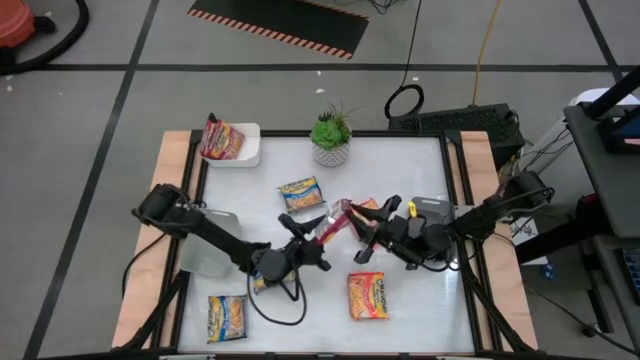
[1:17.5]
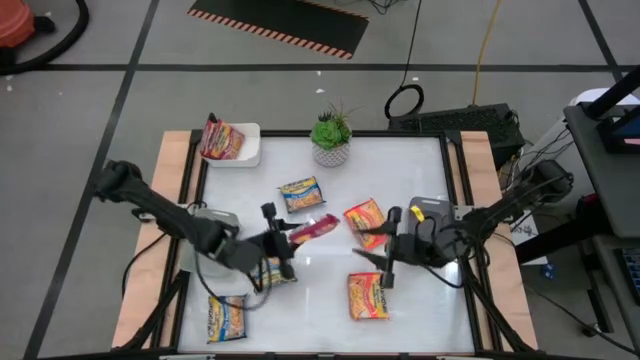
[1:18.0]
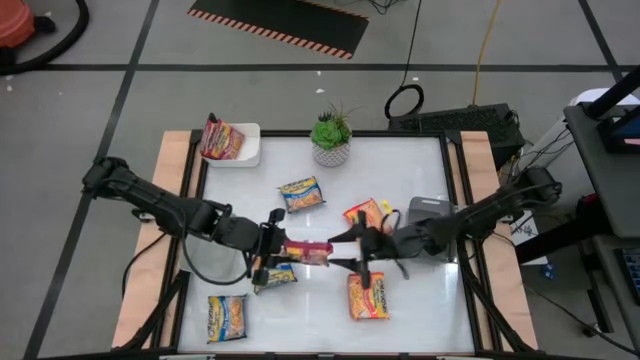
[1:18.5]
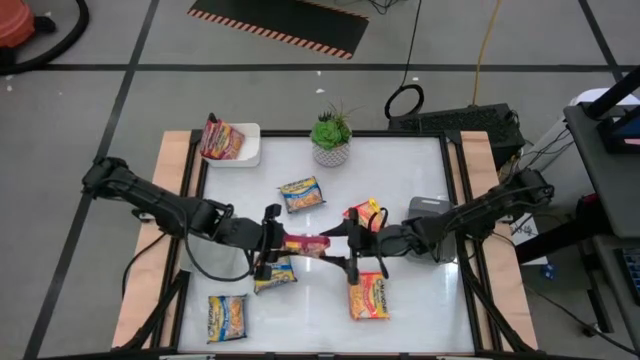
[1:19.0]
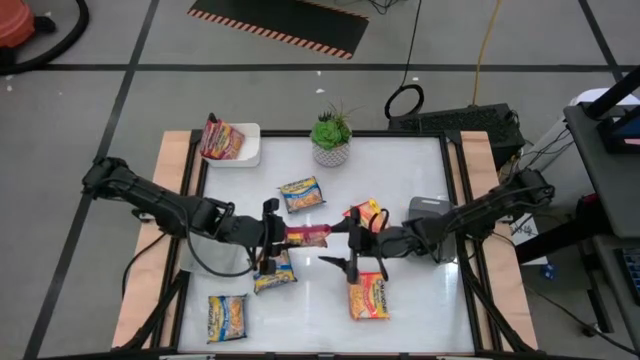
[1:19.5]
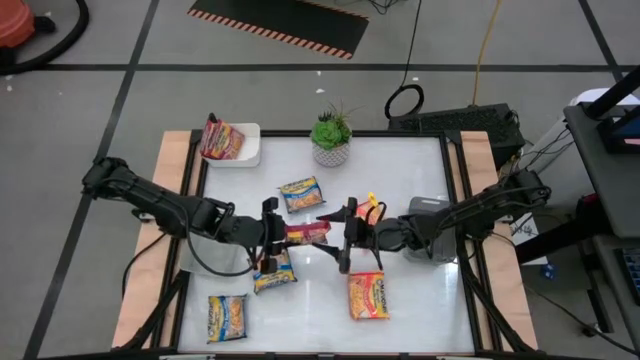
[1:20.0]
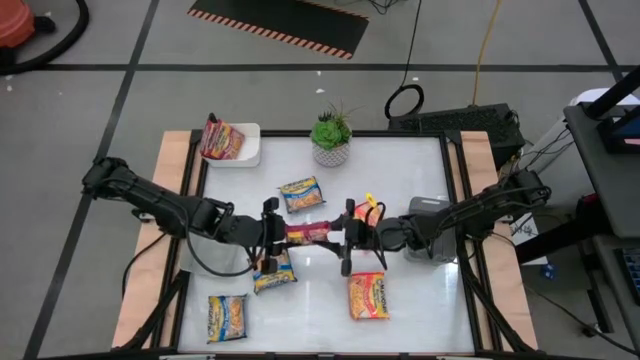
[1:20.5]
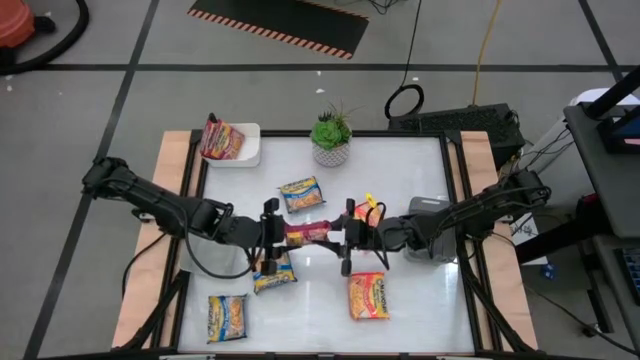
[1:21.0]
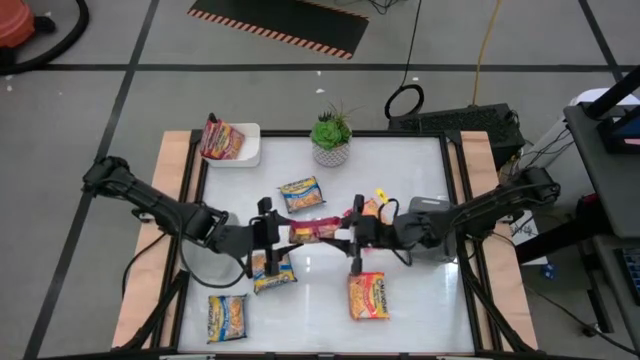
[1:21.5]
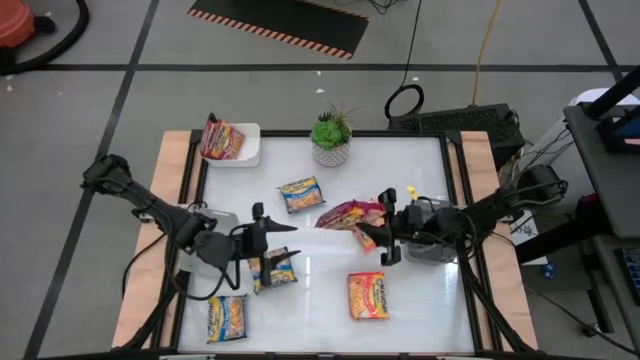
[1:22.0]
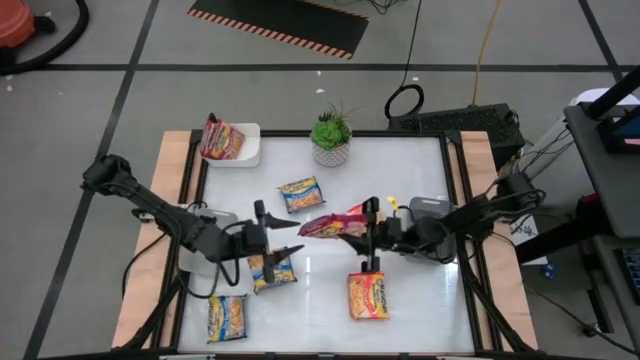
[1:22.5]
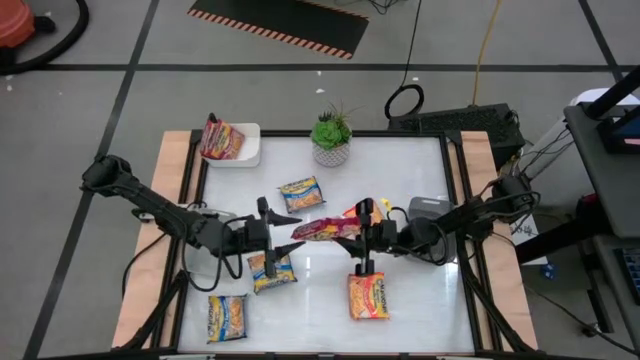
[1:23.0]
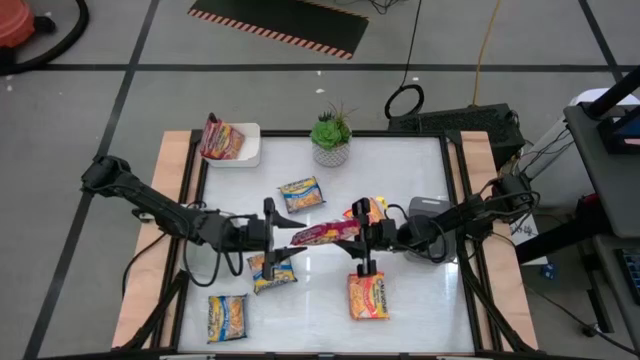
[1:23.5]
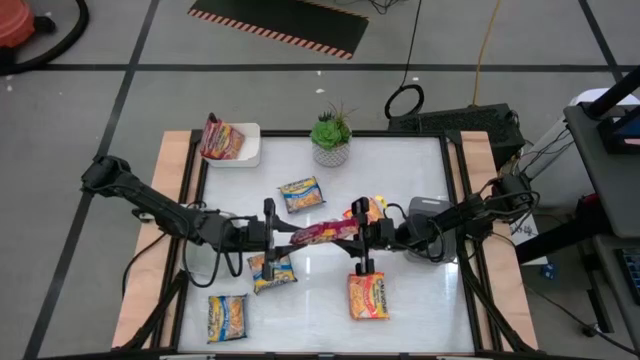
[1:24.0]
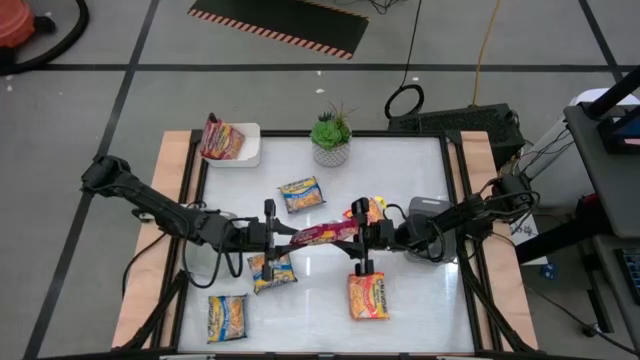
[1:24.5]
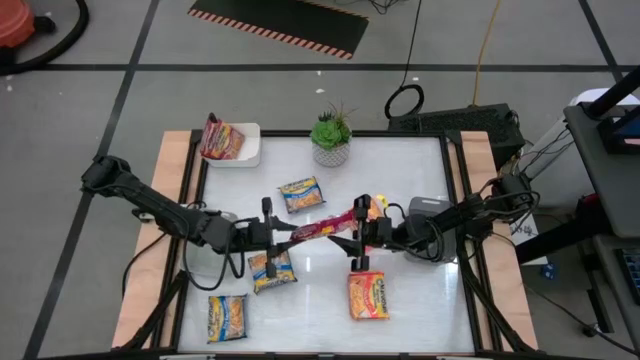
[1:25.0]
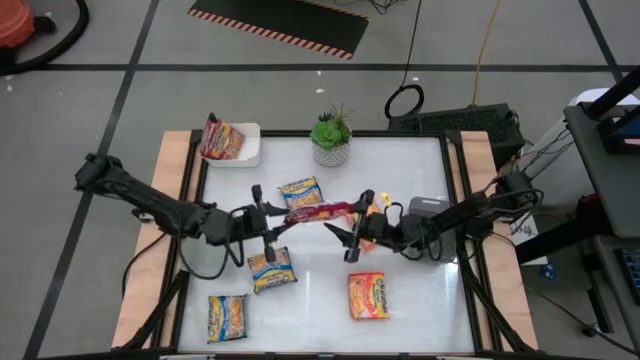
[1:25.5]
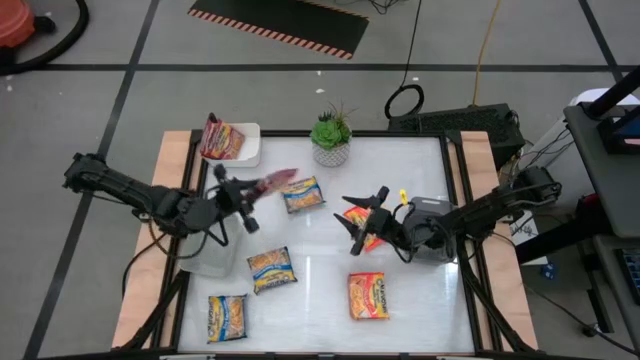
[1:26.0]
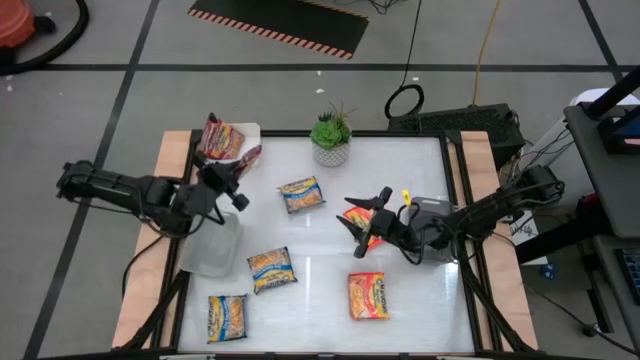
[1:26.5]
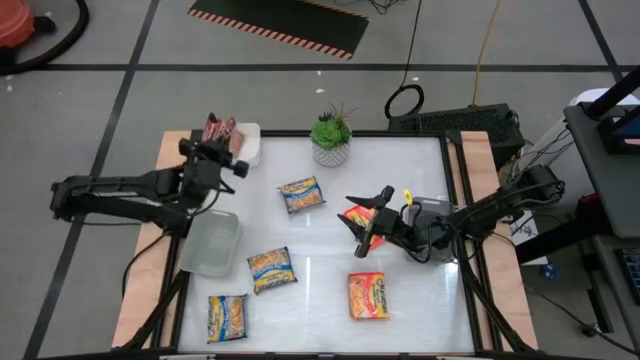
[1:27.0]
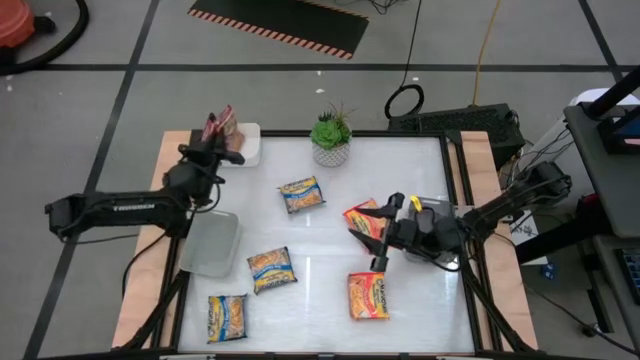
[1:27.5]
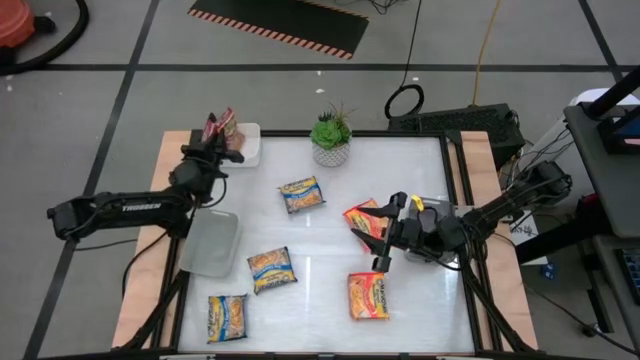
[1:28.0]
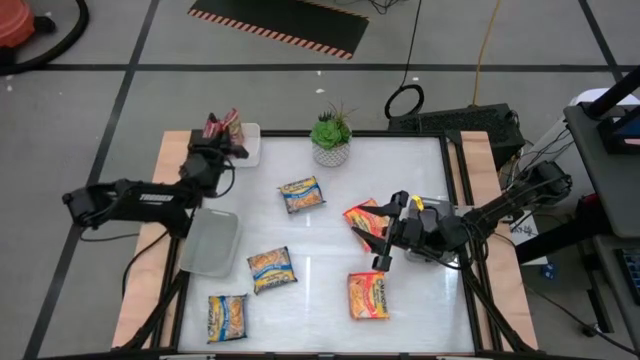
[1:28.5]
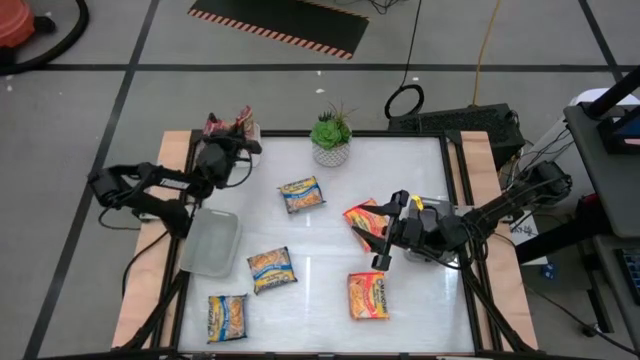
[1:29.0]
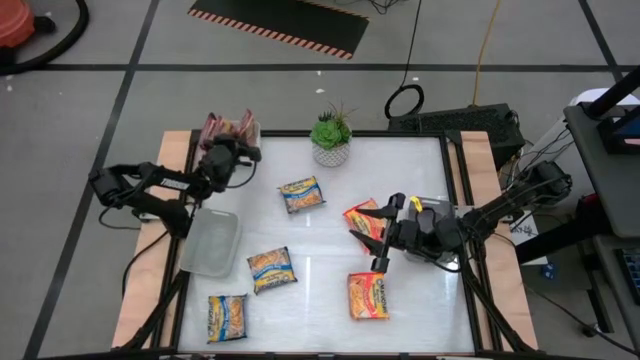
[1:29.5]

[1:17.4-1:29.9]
Task: Sort Maruchan noodles
Put the red noodle pack into the white bin

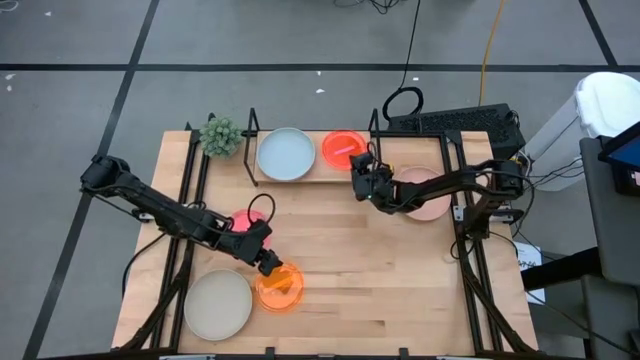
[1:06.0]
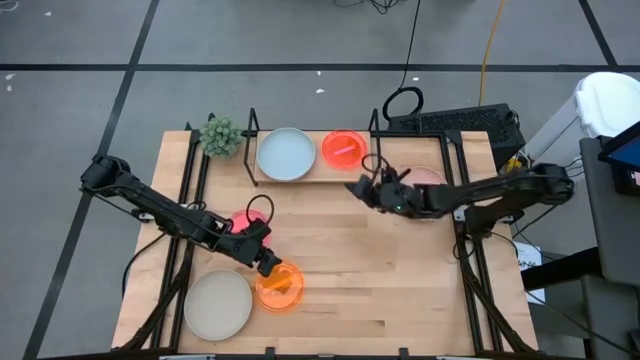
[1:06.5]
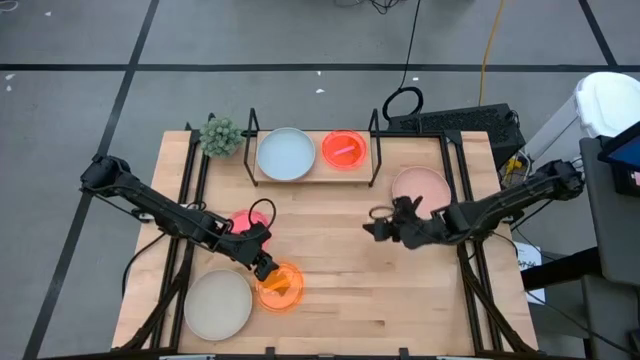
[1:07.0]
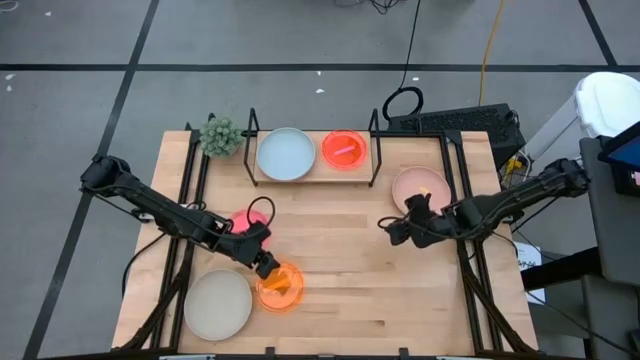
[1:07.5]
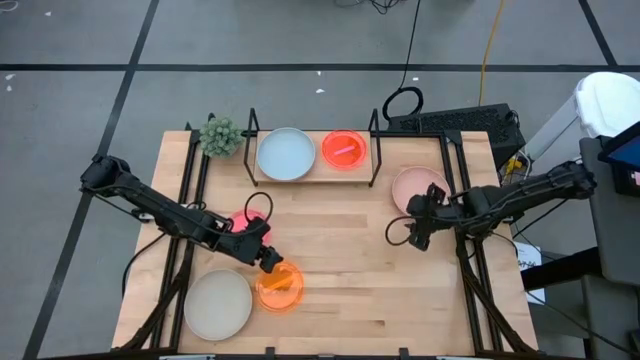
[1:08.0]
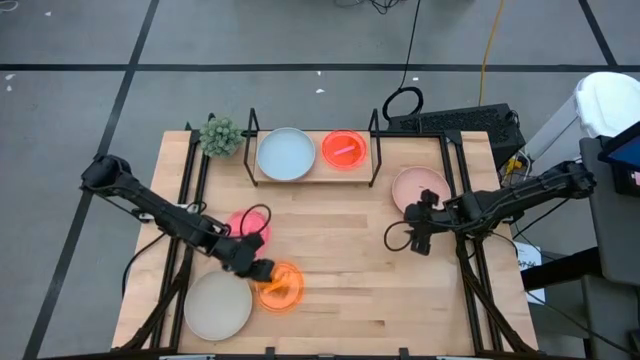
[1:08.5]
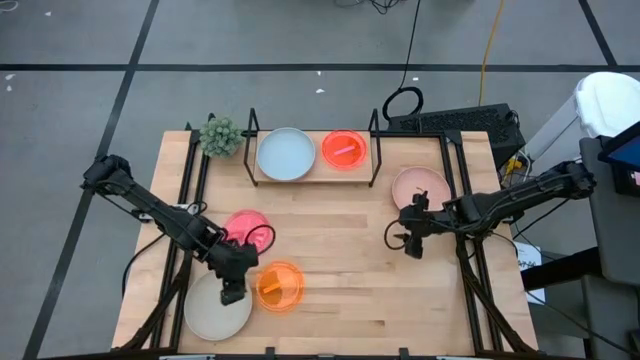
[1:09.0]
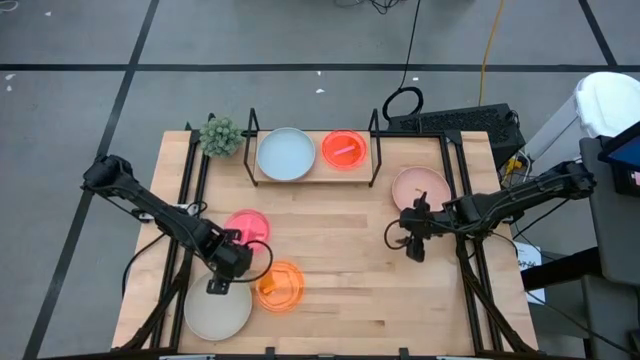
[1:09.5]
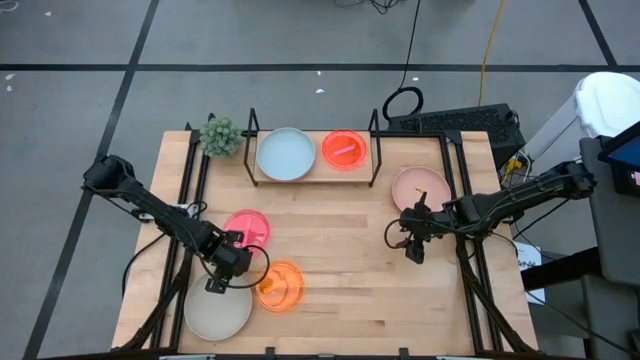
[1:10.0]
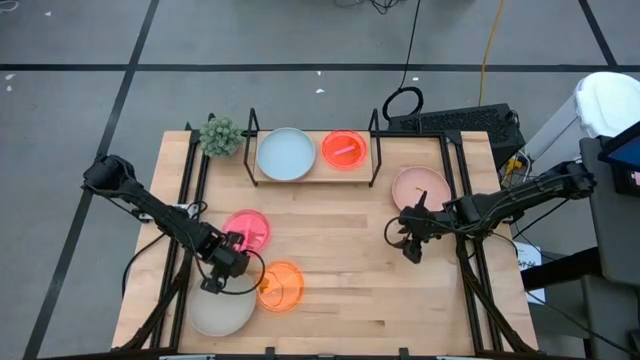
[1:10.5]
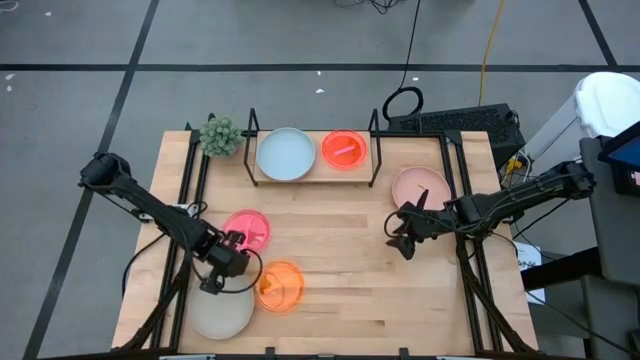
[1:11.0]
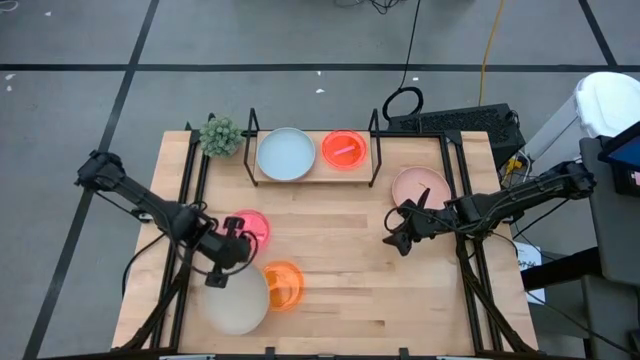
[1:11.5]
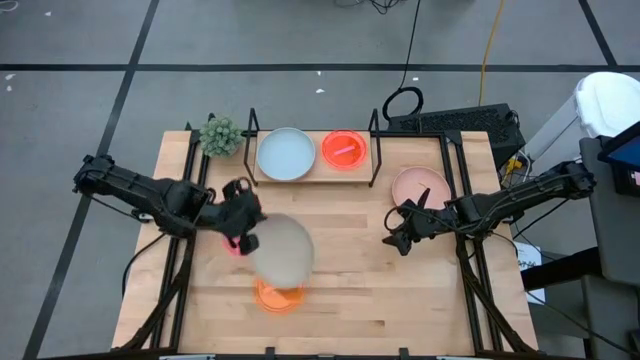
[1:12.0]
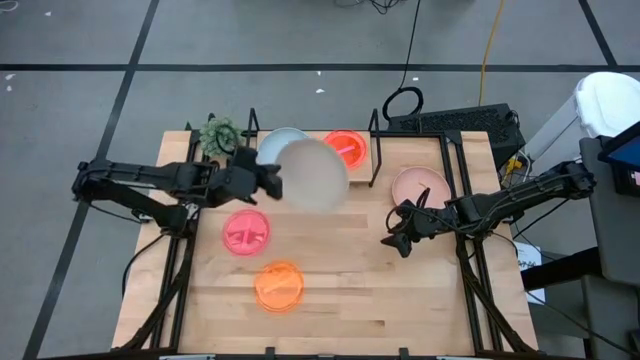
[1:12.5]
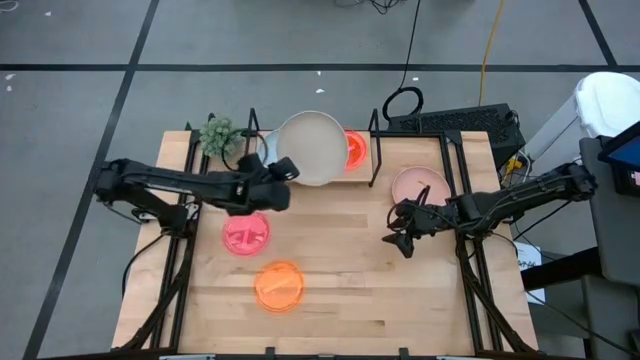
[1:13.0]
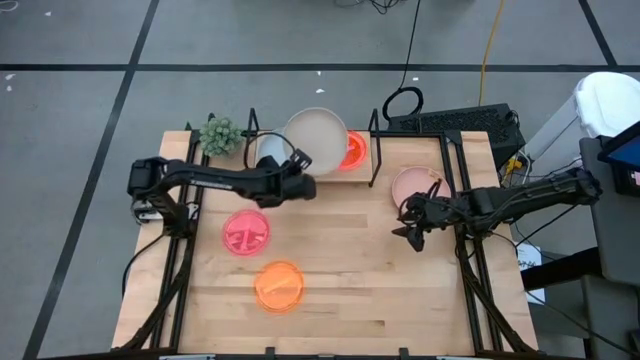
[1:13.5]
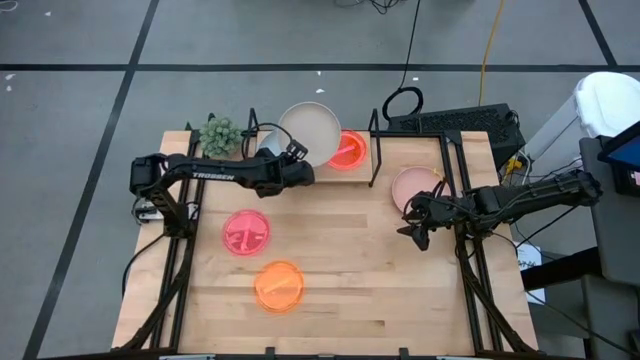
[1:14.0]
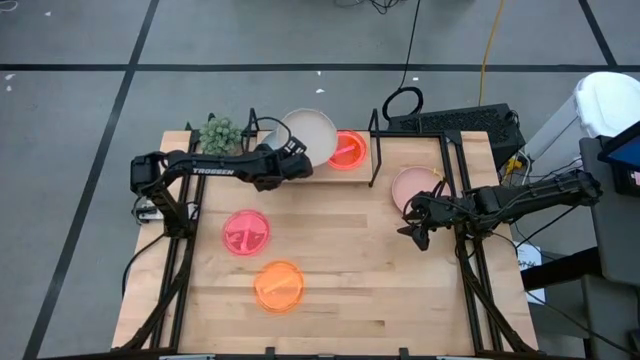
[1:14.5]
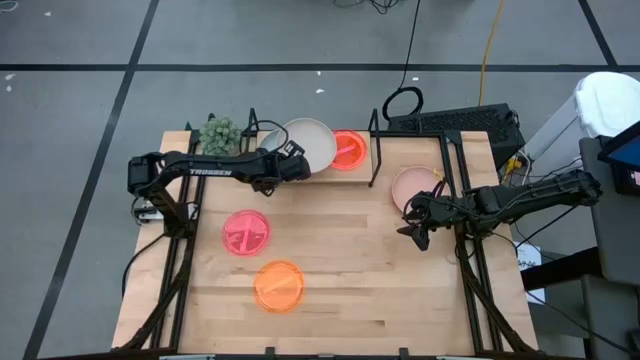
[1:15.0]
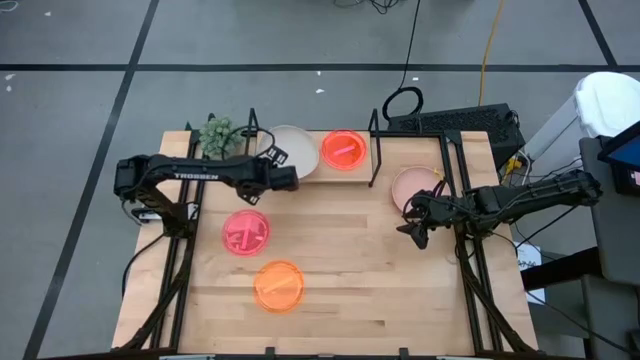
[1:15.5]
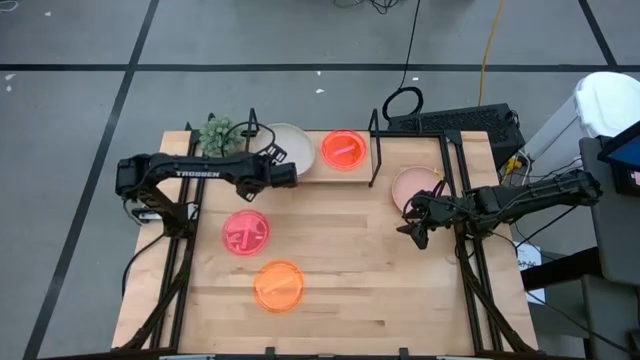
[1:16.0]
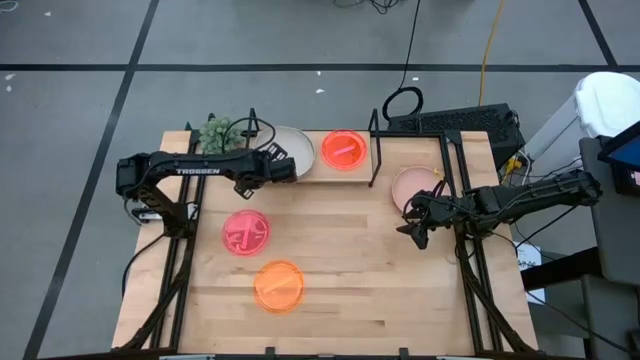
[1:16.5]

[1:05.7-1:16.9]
Task: Place and stack plates onto a shelf
Stack the light brown plate on the blue plate on the shelf
